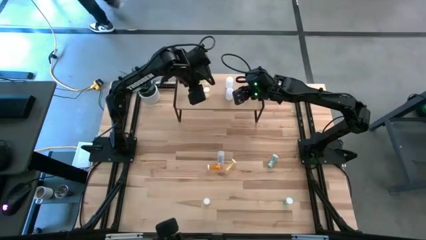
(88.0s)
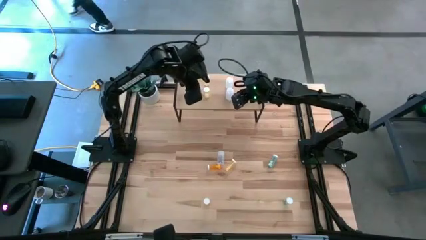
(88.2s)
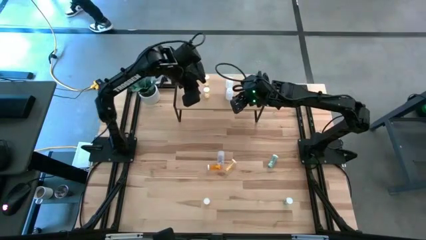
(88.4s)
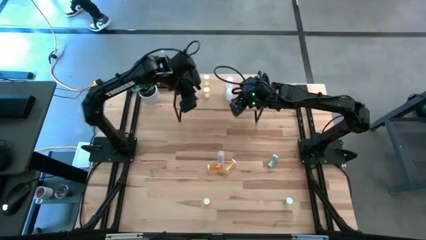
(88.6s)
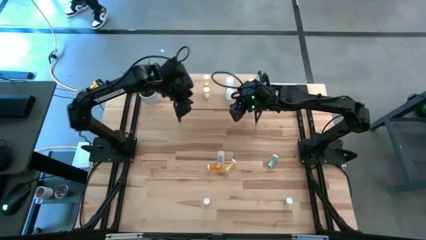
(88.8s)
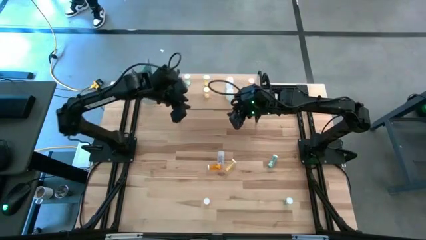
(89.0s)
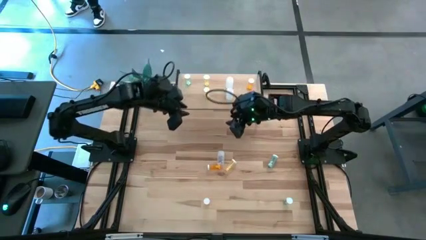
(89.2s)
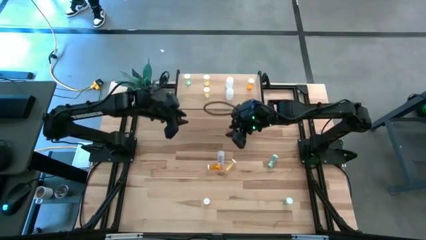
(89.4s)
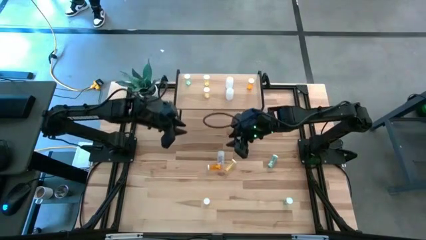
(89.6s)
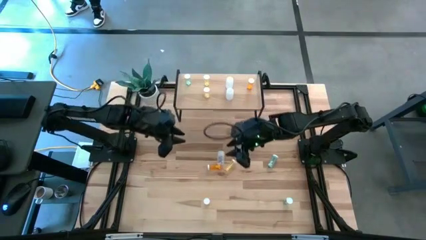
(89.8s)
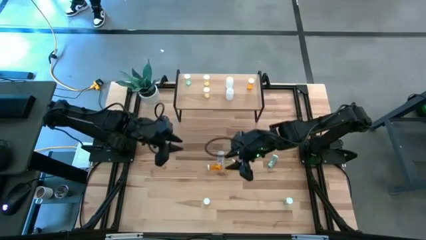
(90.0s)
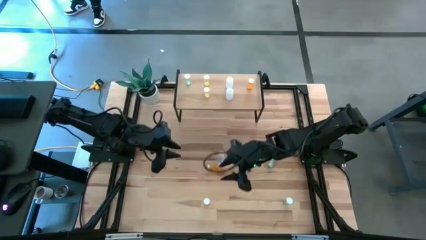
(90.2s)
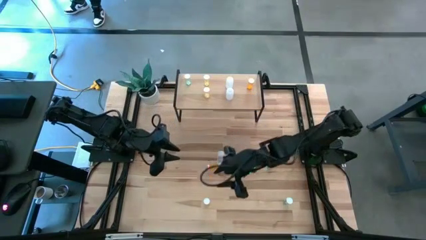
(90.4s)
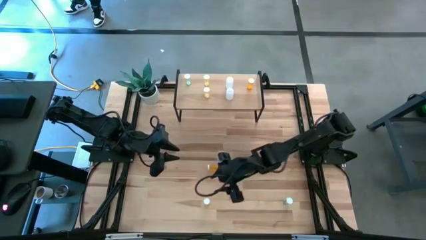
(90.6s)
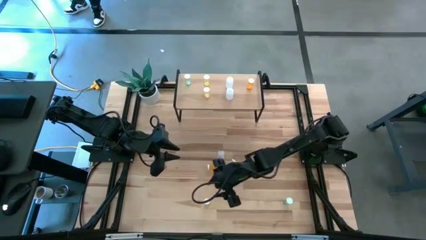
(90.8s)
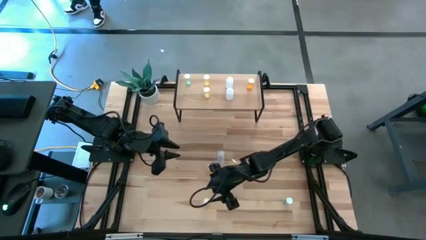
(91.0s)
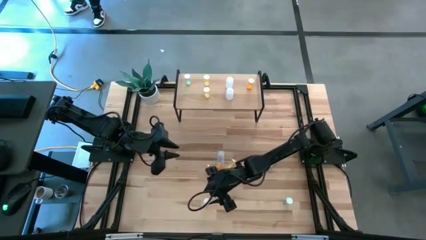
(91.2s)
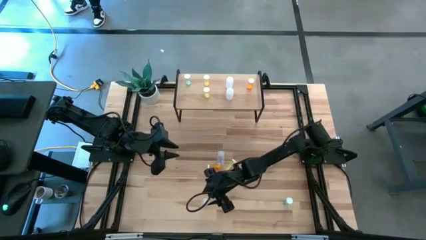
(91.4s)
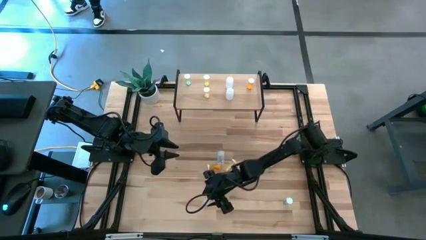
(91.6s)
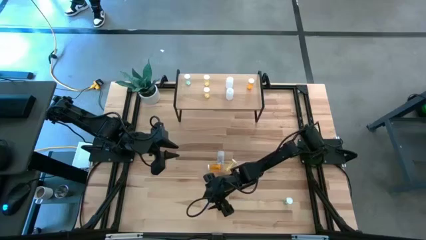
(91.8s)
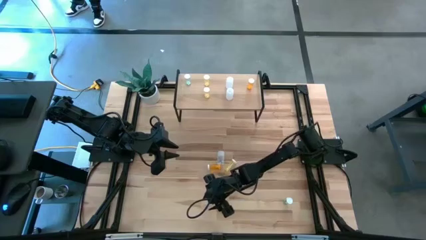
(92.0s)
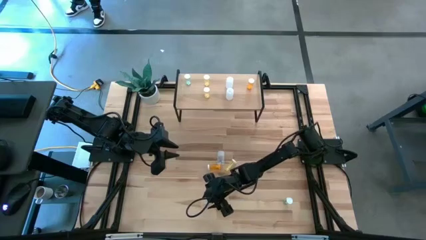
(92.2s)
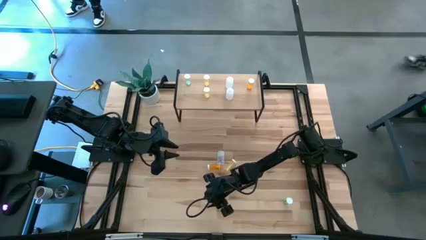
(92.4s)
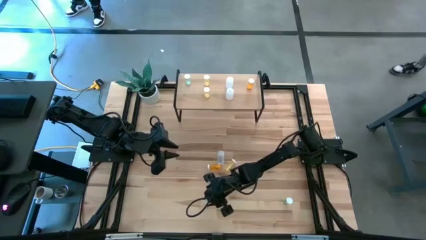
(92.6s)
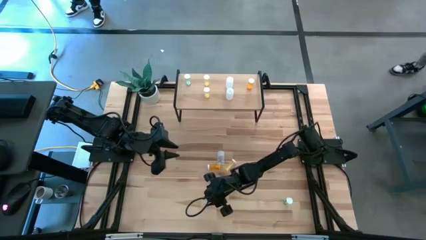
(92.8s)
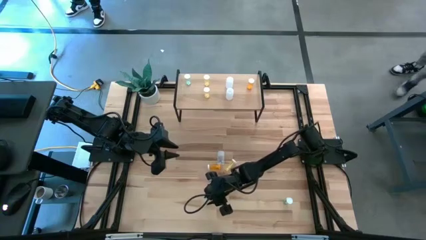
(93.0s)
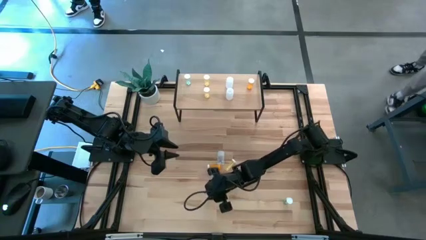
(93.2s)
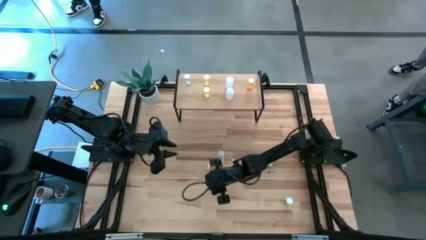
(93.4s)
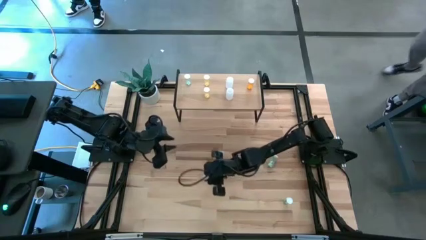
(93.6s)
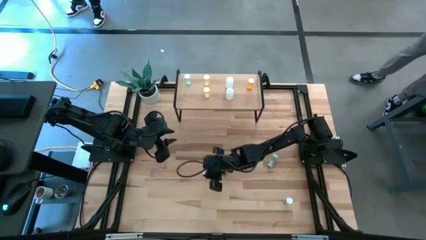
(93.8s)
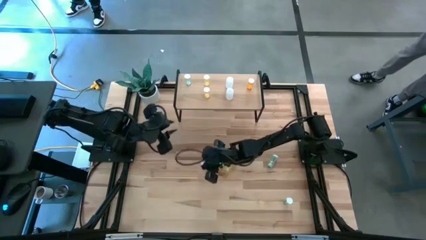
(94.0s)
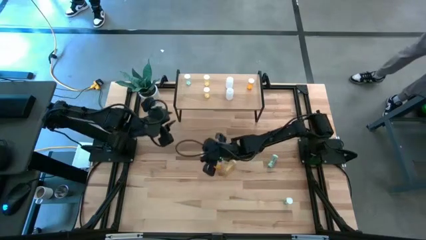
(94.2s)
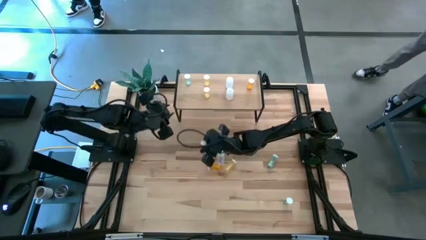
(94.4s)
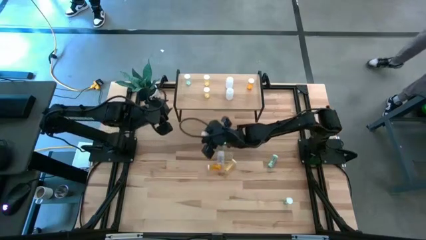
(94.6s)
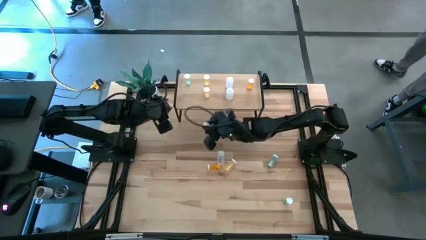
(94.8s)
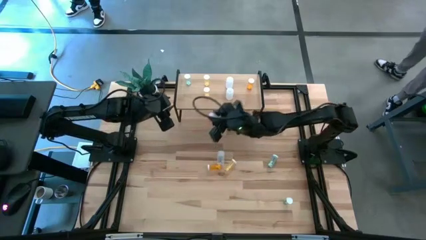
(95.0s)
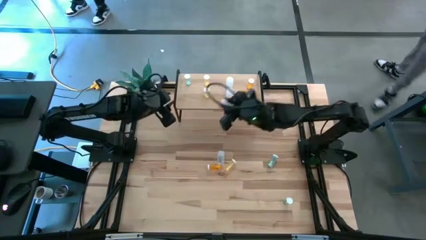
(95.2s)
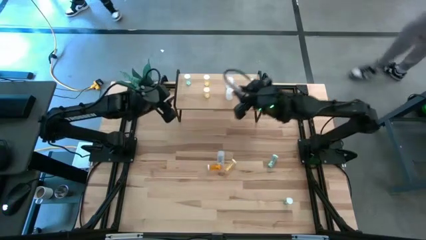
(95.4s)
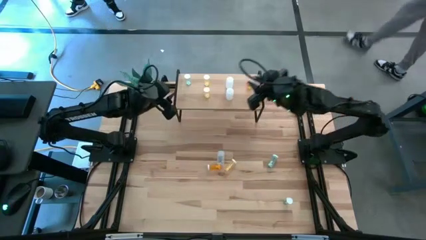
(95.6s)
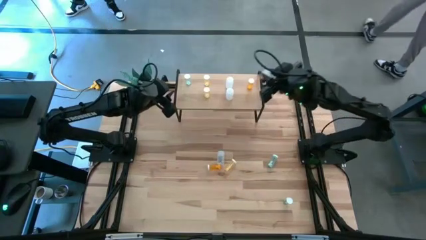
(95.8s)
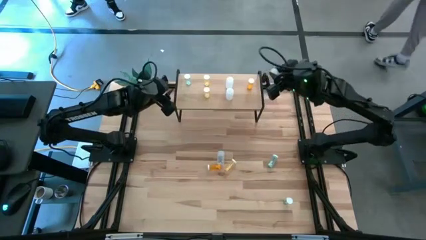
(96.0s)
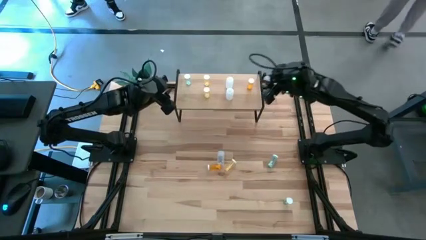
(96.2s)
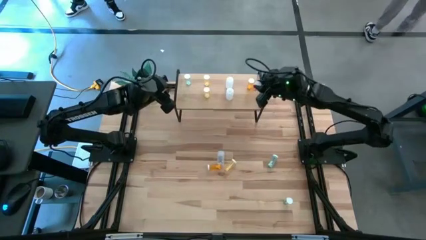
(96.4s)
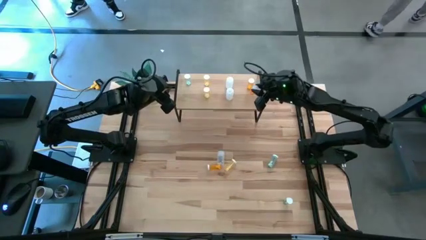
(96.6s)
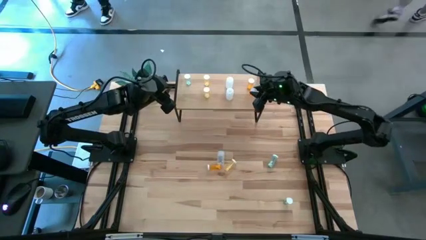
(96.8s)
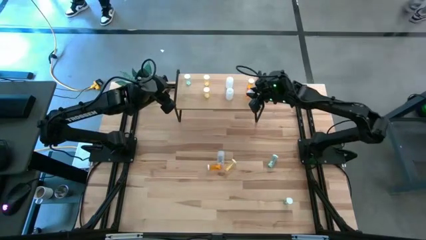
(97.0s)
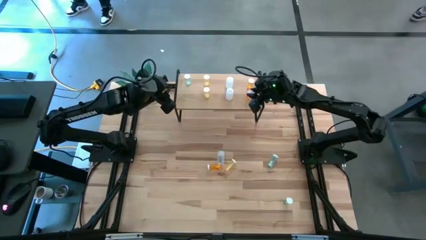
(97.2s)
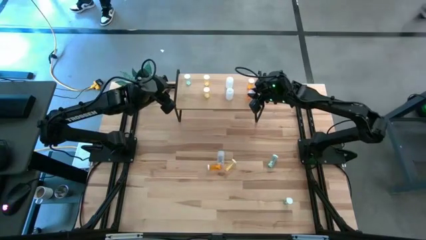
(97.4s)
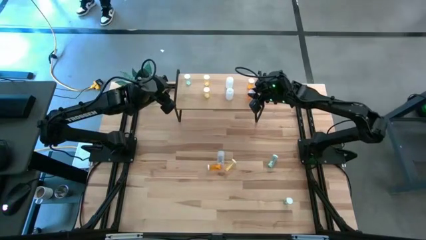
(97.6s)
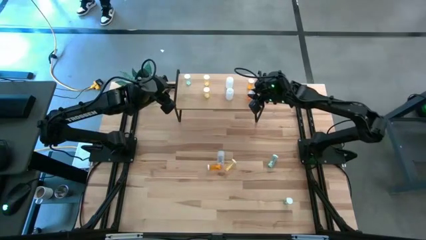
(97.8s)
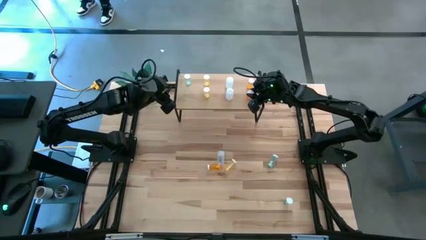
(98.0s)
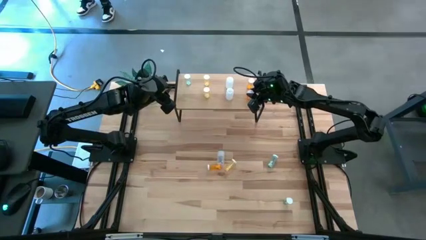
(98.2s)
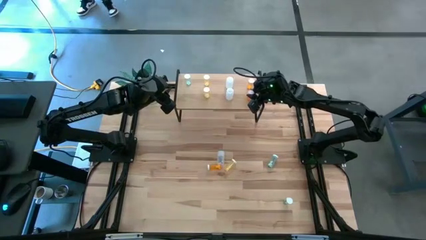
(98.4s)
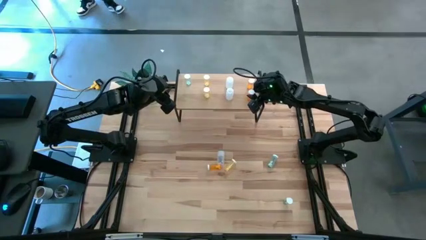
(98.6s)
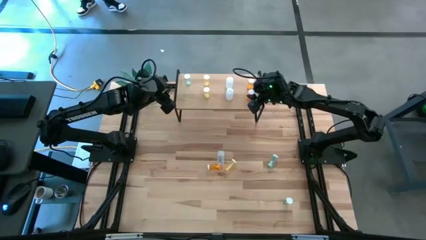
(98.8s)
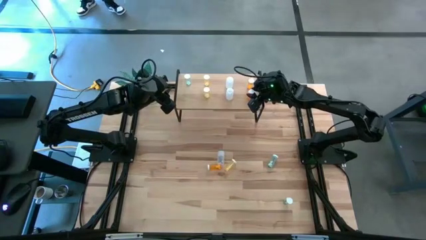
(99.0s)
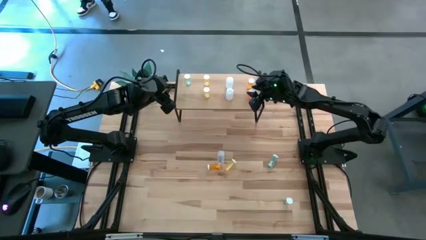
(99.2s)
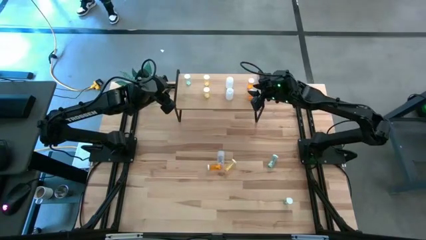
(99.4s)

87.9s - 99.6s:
Task: Pick and place medicine bottles onto shelf by color
Put the bottom orange pill bottle aligned with the other orange pill bottle on the shelf
